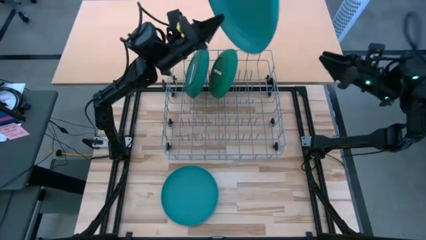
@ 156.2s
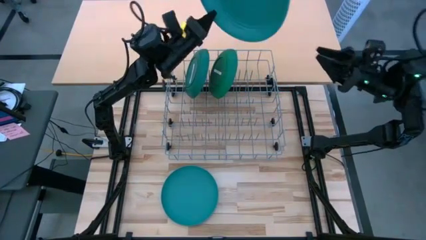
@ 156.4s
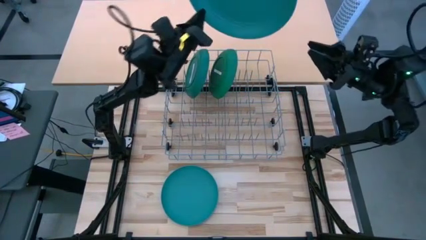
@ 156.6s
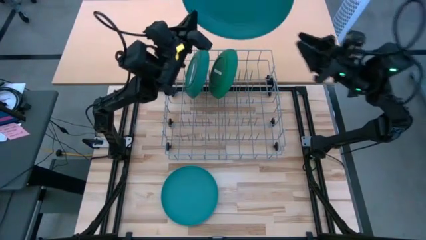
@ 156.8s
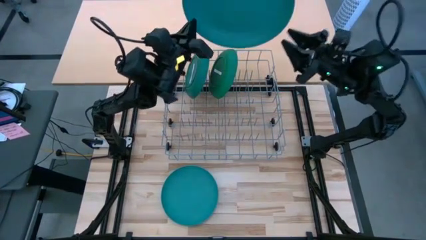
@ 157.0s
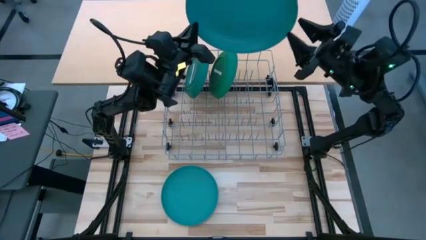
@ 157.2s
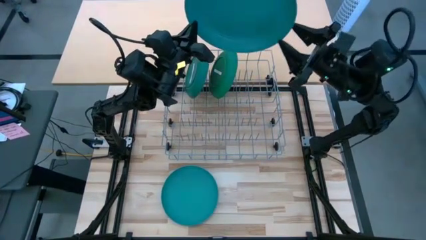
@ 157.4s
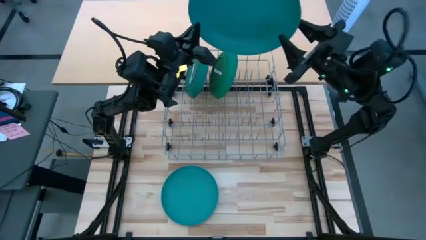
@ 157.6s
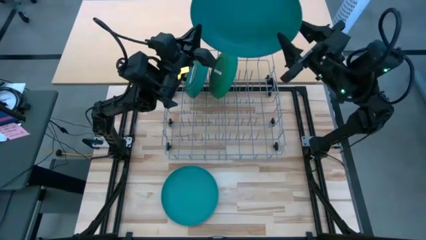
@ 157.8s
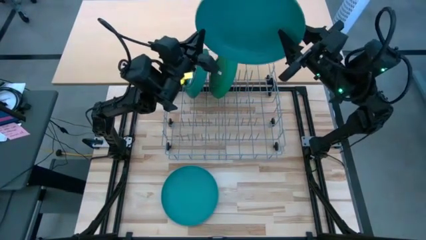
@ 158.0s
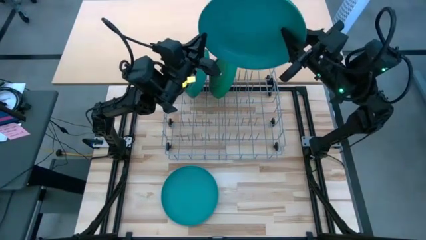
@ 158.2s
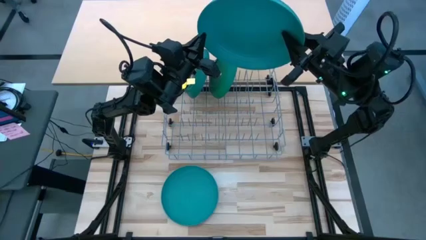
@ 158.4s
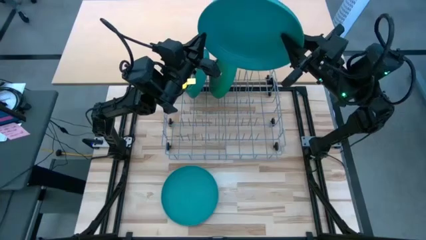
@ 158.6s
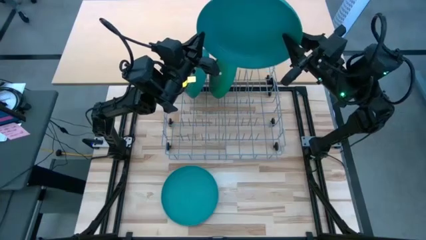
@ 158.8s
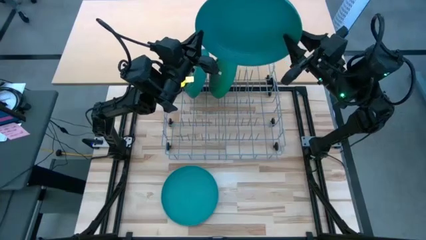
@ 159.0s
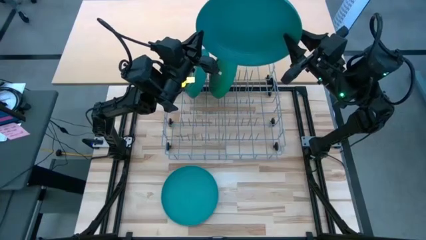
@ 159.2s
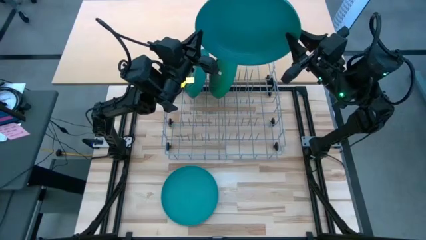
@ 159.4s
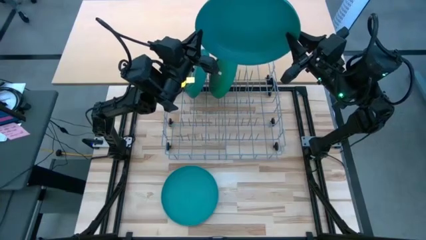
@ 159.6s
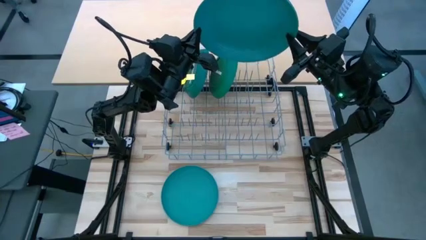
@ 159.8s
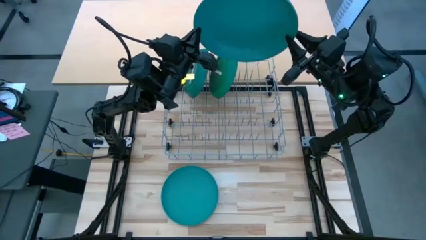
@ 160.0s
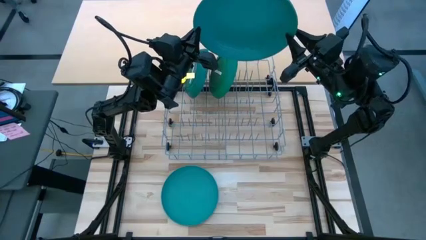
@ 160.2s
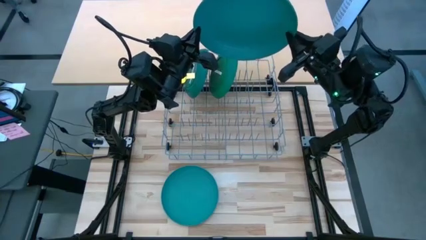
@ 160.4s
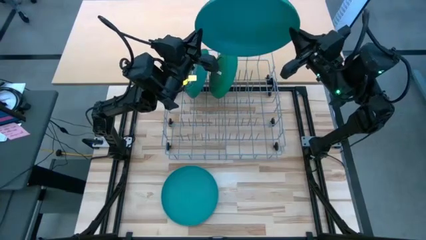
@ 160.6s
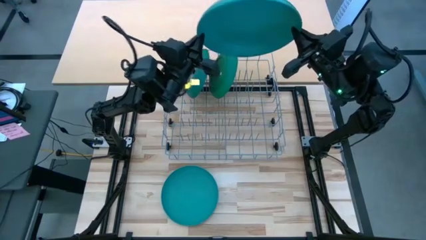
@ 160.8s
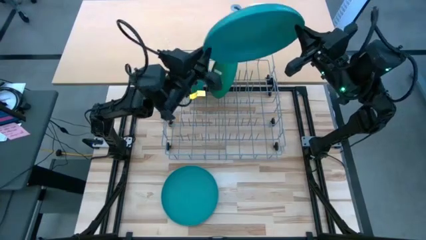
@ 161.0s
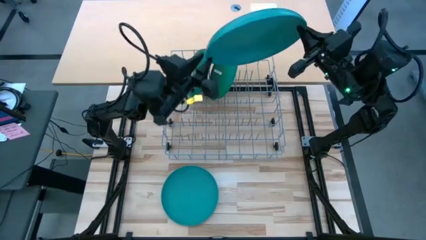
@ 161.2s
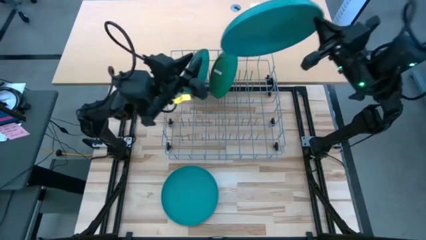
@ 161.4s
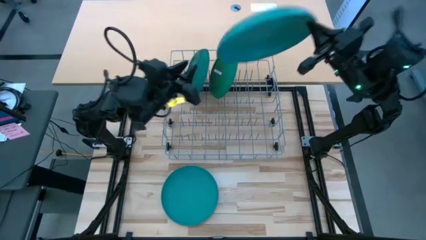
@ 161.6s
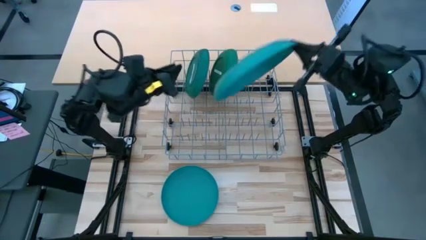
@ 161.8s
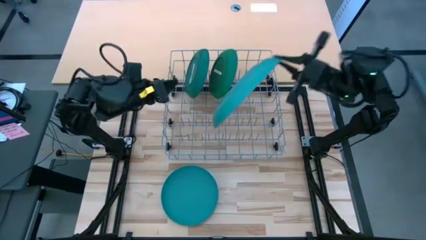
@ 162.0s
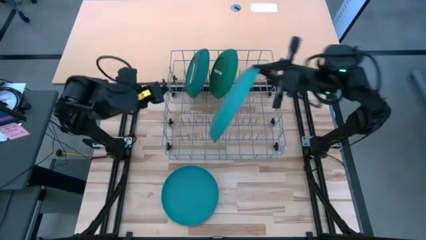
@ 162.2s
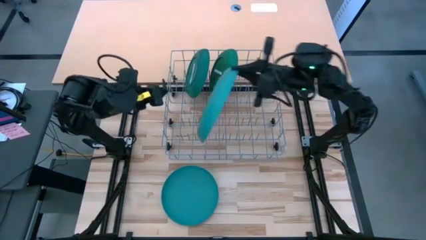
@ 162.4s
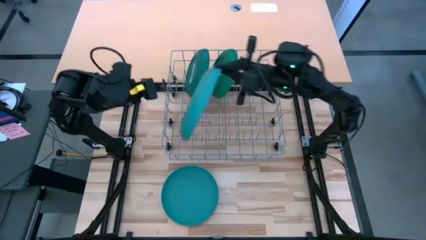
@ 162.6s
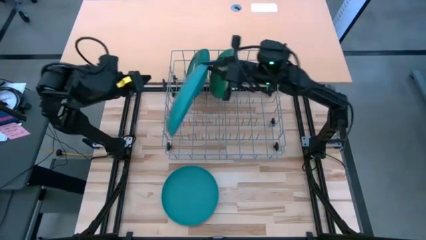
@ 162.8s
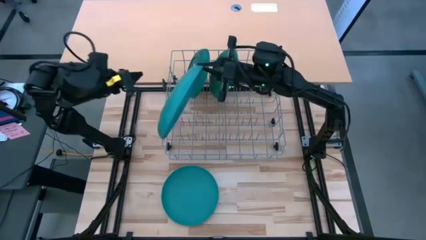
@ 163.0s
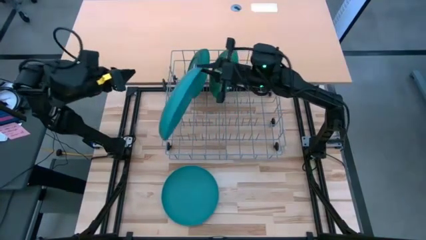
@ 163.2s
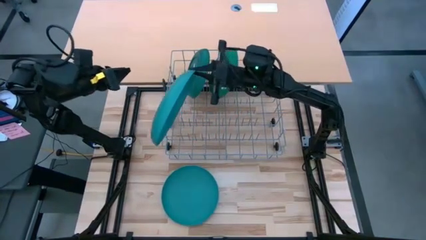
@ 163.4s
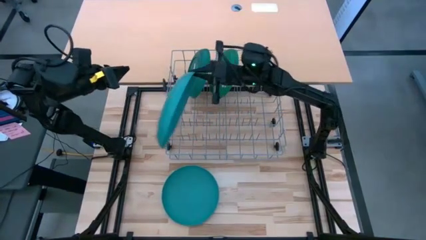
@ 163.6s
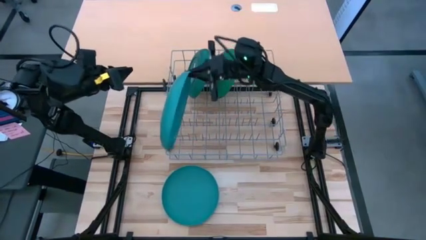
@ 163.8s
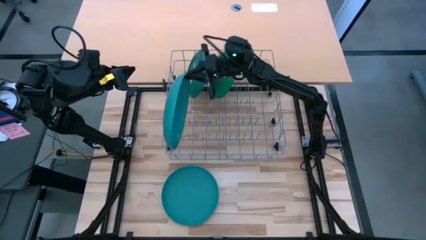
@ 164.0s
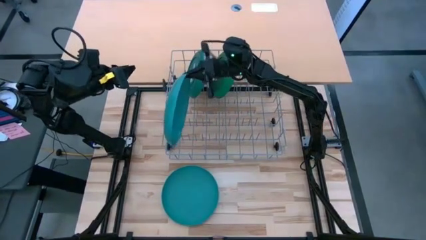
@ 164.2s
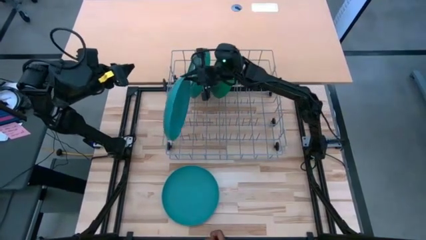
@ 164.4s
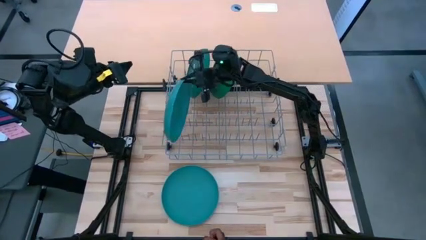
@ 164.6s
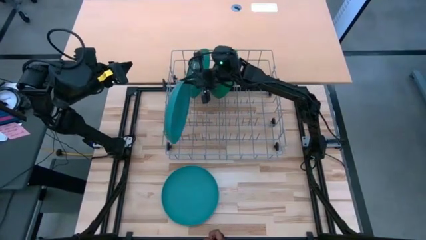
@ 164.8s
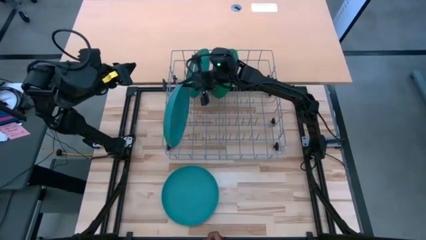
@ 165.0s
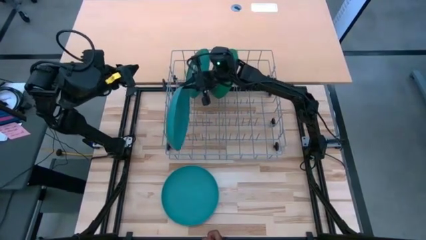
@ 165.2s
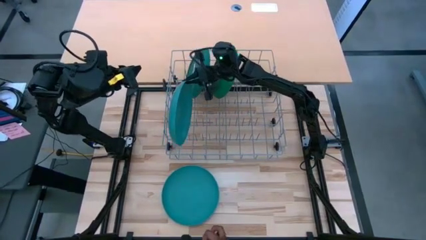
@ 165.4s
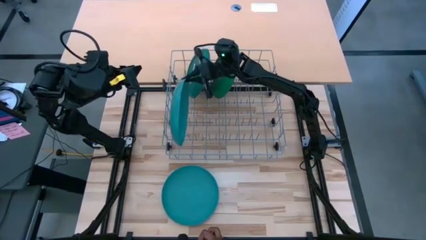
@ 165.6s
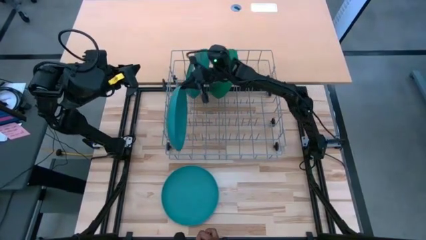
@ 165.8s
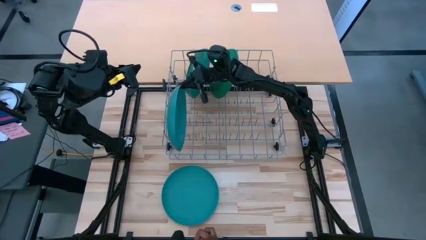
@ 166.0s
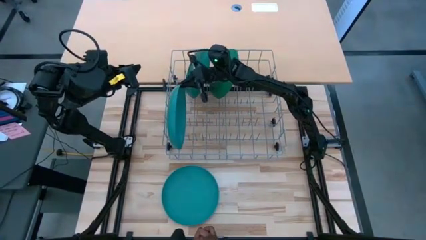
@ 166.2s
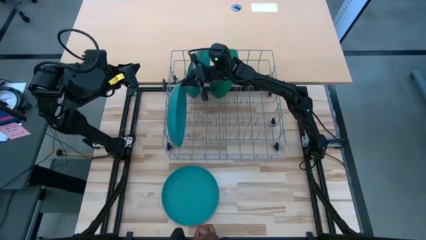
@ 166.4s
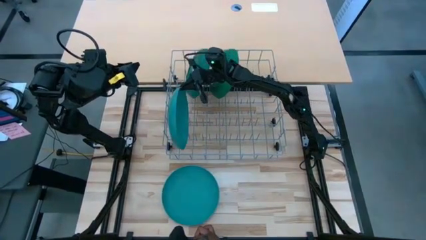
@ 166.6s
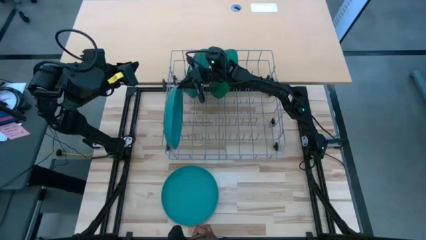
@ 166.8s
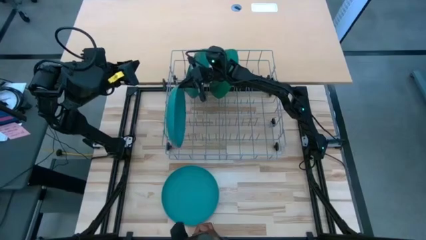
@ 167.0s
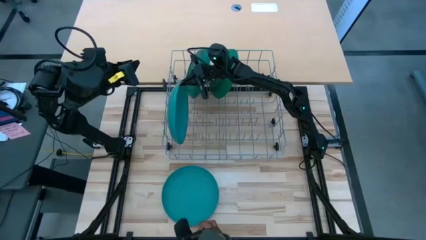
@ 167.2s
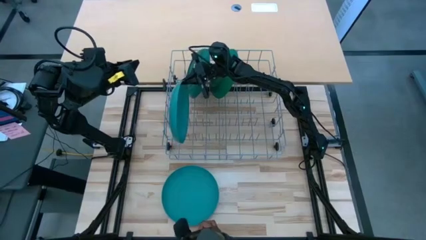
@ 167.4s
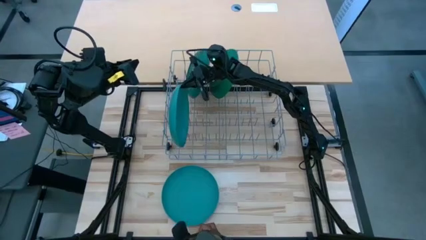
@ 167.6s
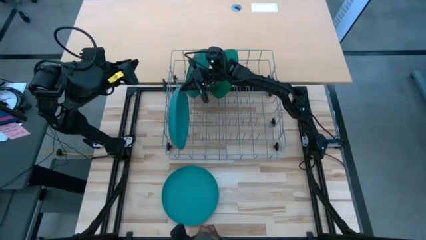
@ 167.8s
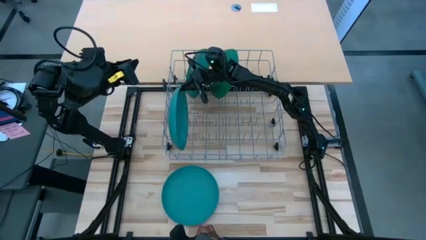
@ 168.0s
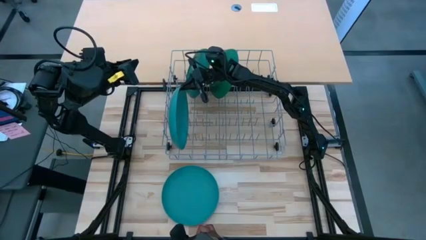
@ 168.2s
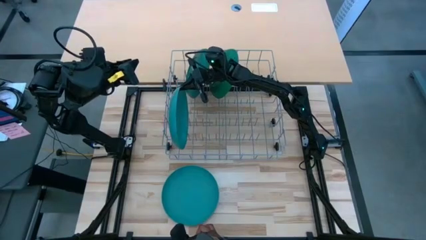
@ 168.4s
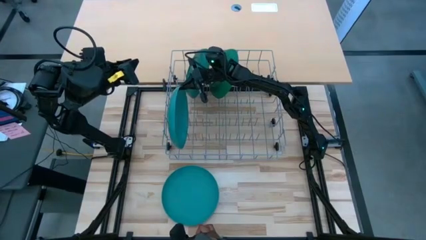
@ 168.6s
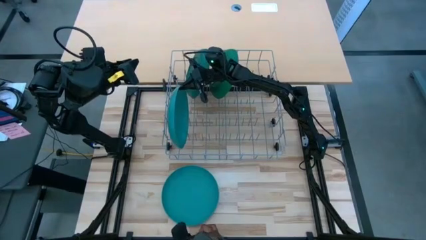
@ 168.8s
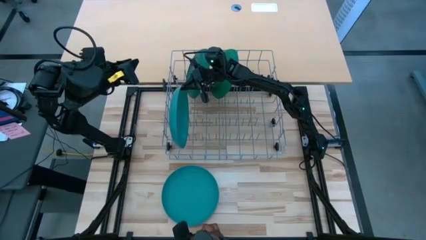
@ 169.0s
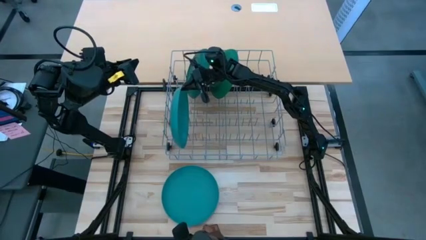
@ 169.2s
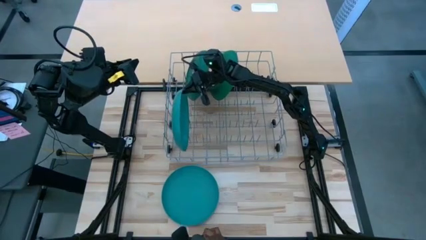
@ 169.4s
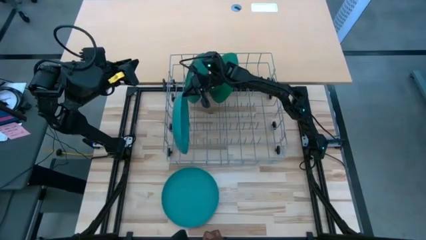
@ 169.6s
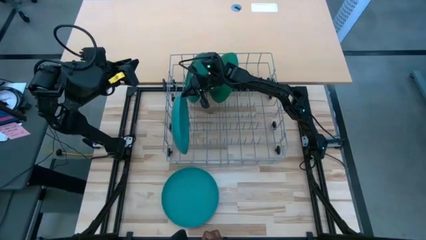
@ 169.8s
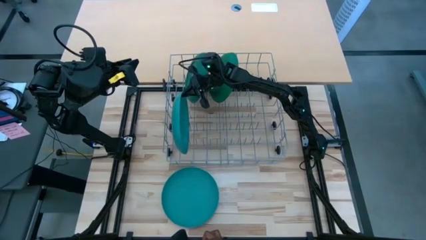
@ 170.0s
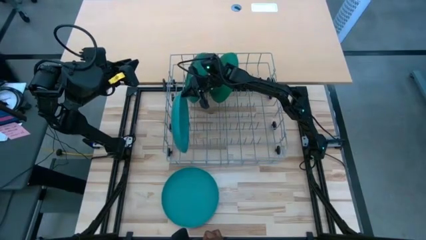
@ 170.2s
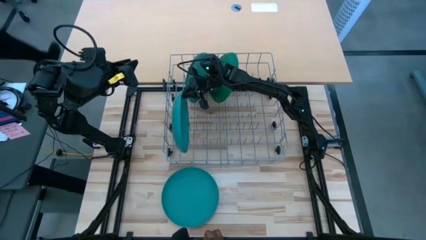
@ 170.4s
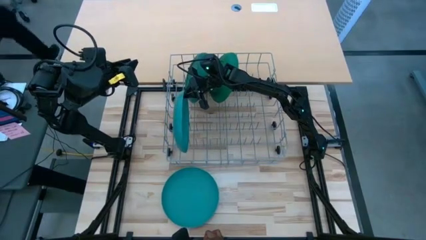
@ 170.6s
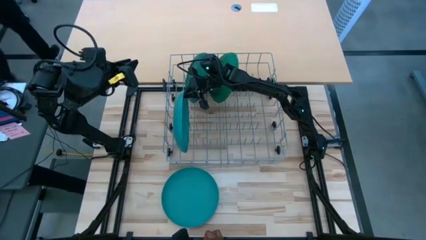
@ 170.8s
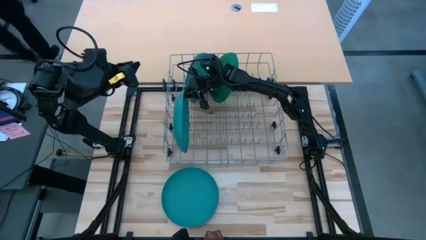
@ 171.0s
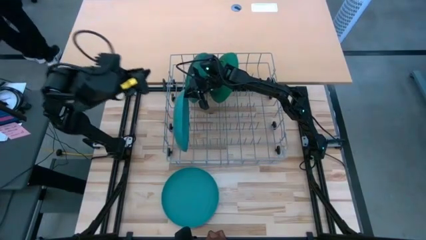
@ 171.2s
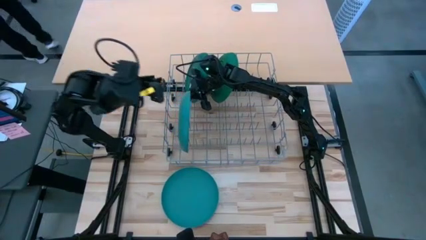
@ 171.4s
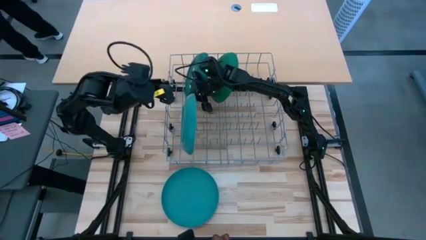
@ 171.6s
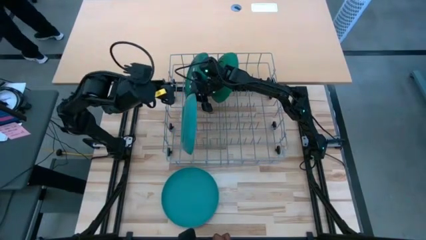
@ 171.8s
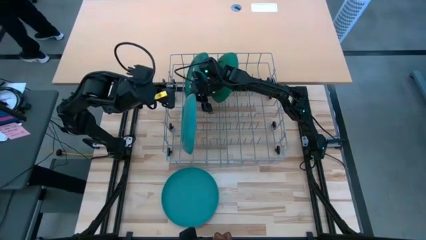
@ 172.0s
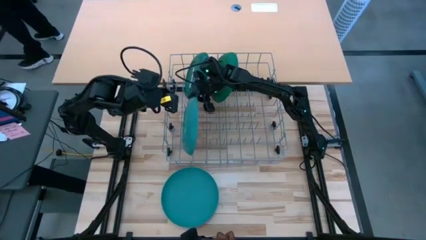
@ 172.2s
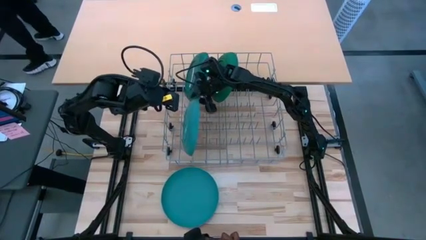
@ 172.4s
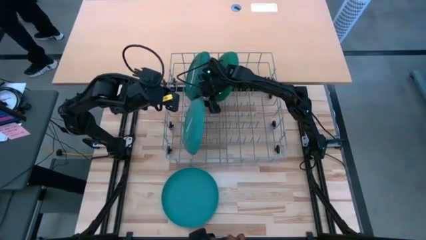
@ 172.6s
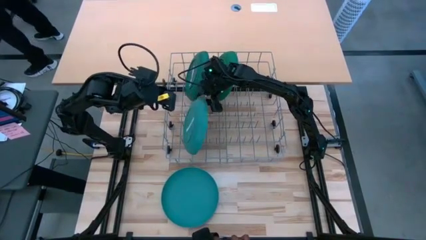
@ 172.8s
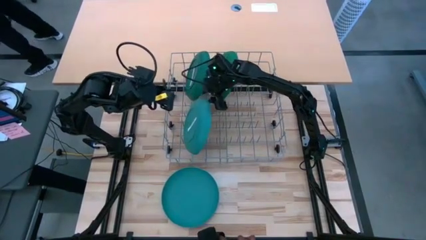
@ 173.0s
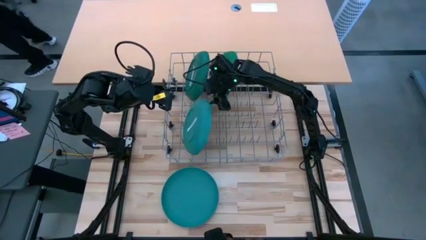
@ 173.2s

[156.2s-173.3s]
Task: Sort dishes
Put the blue plate into the dish rack
